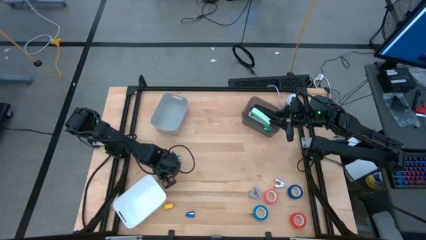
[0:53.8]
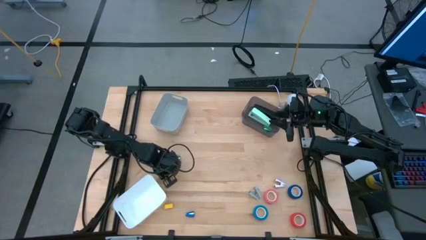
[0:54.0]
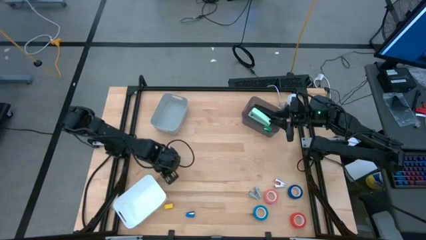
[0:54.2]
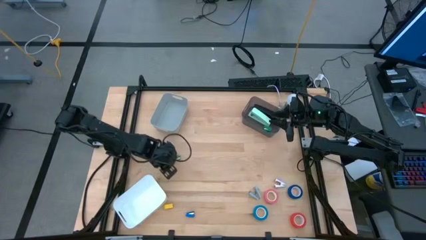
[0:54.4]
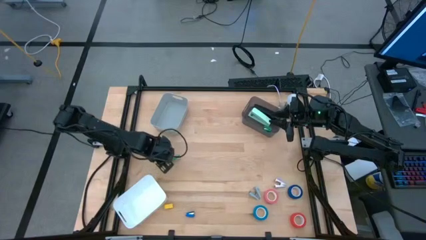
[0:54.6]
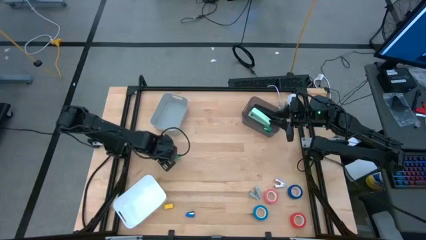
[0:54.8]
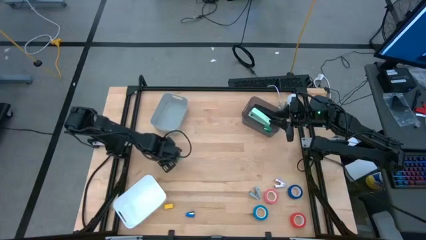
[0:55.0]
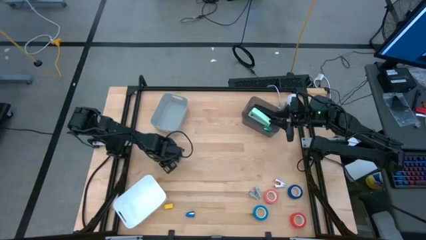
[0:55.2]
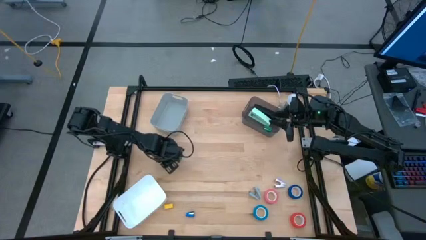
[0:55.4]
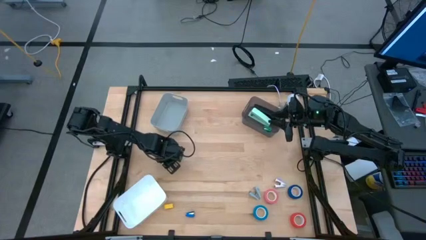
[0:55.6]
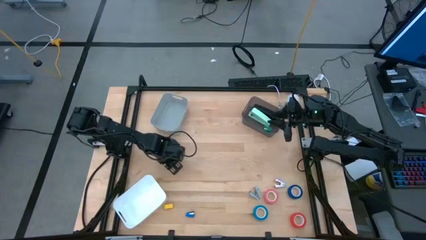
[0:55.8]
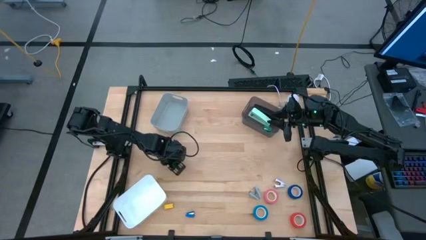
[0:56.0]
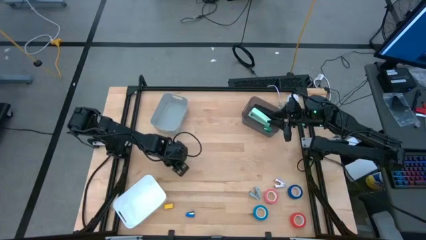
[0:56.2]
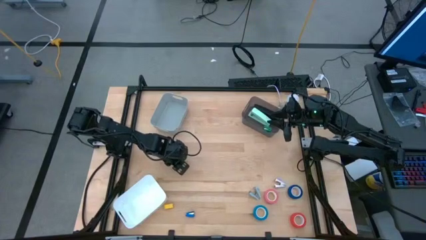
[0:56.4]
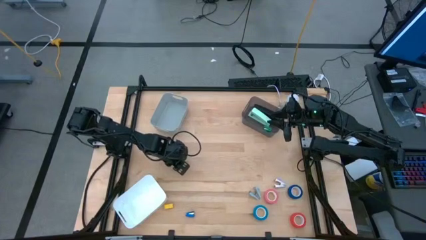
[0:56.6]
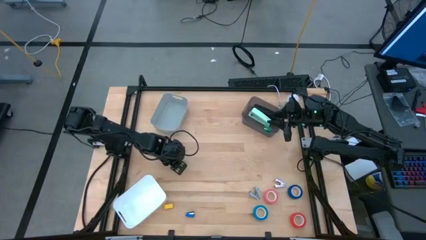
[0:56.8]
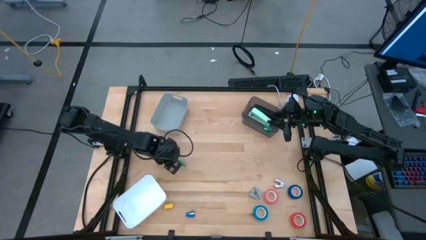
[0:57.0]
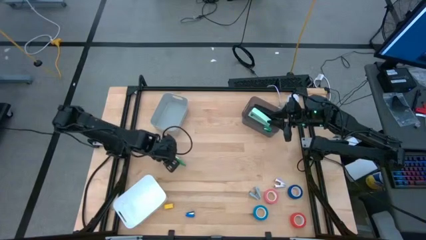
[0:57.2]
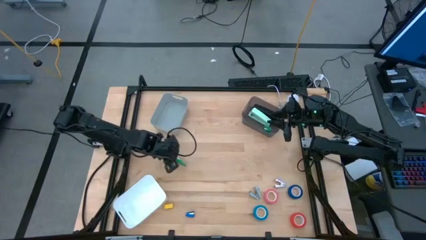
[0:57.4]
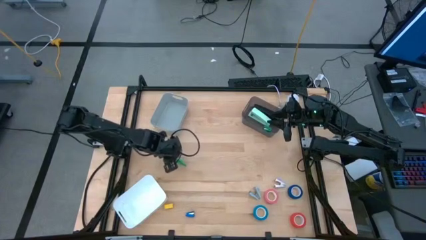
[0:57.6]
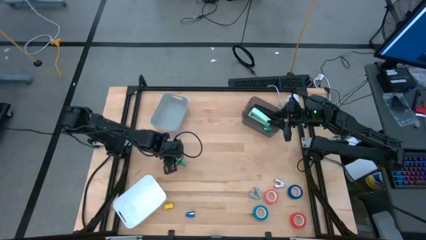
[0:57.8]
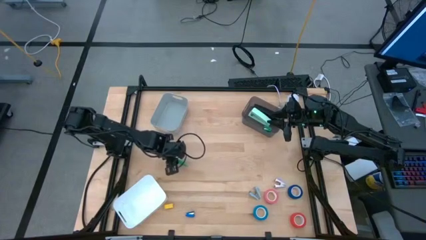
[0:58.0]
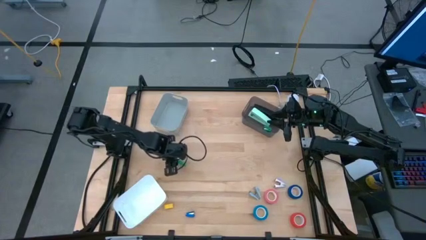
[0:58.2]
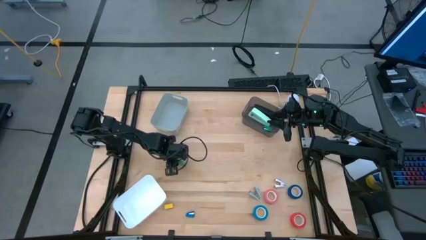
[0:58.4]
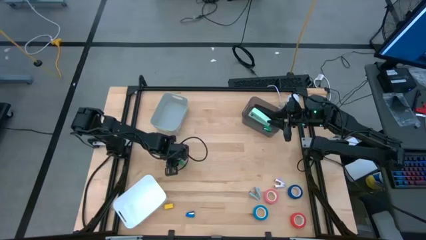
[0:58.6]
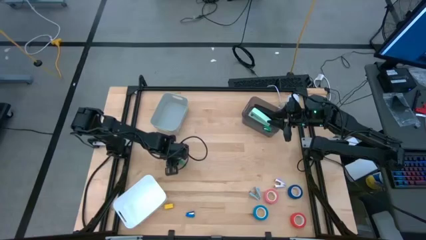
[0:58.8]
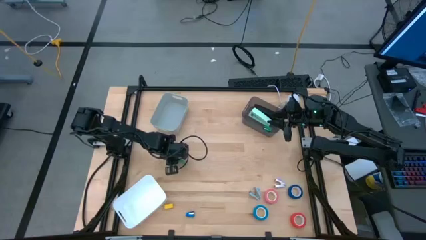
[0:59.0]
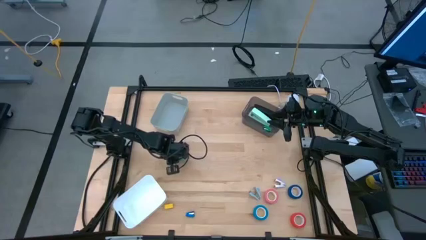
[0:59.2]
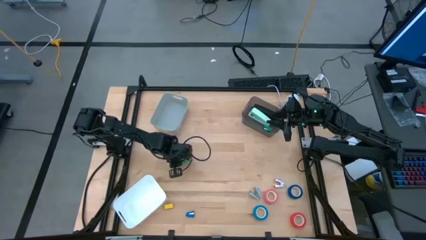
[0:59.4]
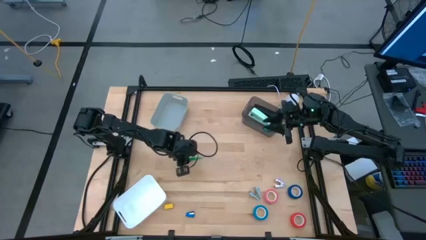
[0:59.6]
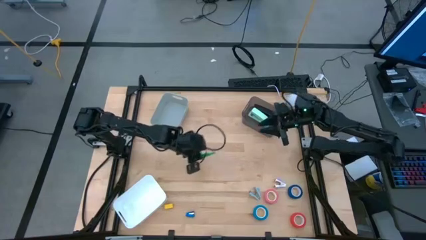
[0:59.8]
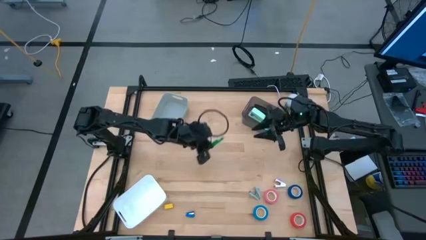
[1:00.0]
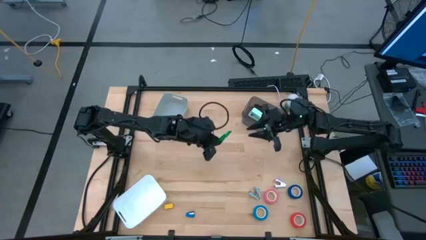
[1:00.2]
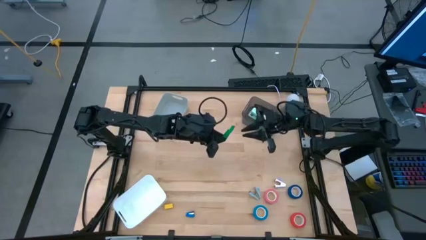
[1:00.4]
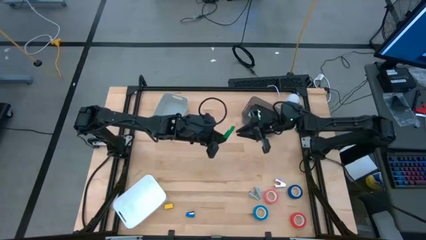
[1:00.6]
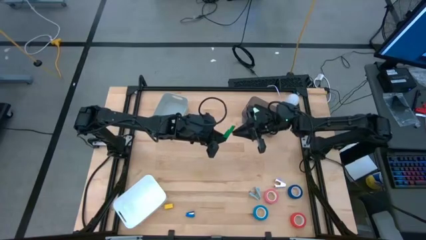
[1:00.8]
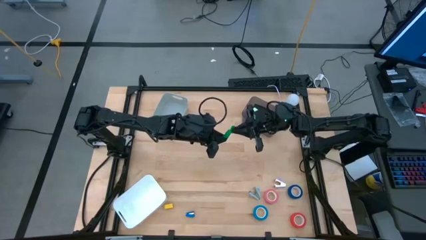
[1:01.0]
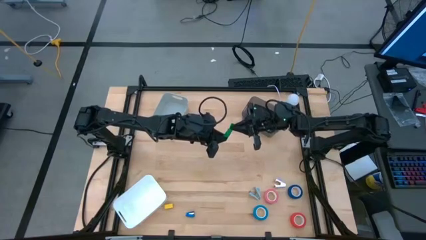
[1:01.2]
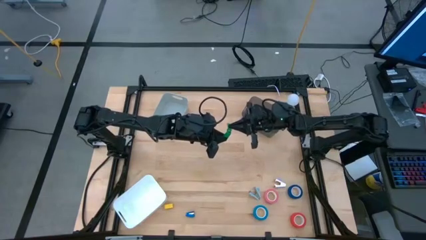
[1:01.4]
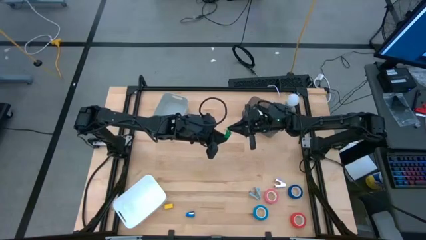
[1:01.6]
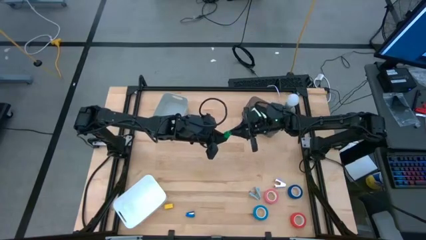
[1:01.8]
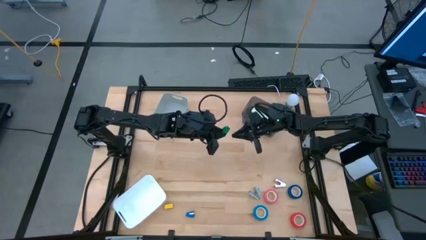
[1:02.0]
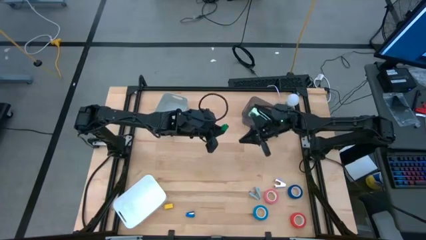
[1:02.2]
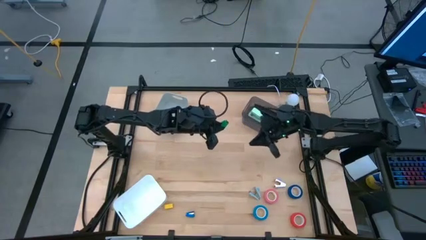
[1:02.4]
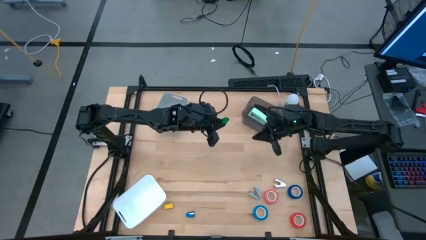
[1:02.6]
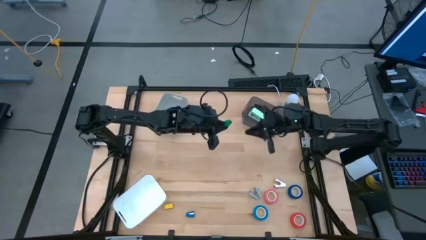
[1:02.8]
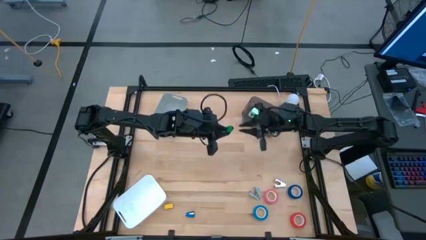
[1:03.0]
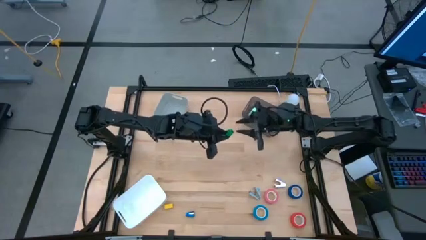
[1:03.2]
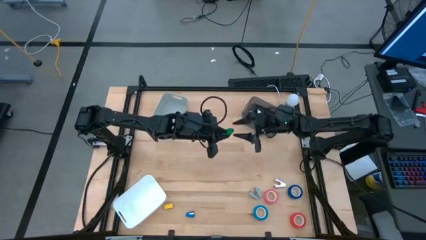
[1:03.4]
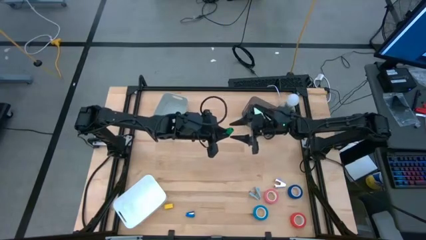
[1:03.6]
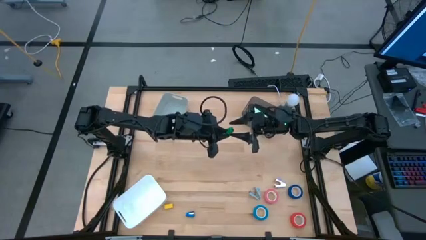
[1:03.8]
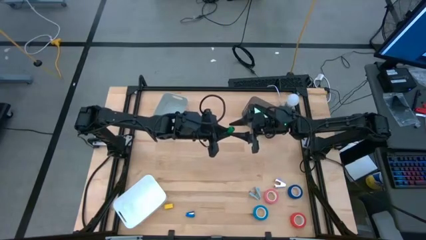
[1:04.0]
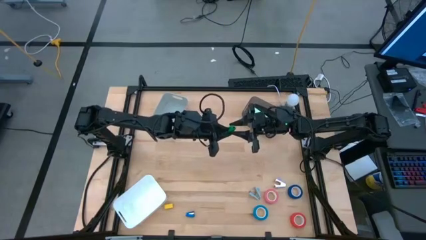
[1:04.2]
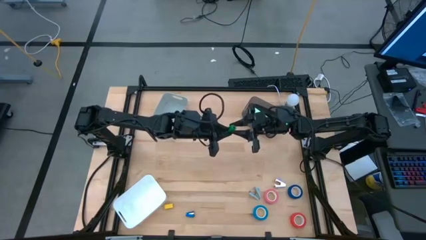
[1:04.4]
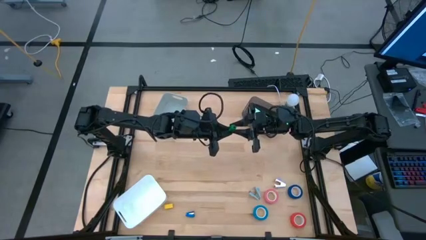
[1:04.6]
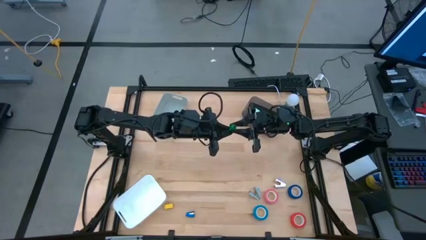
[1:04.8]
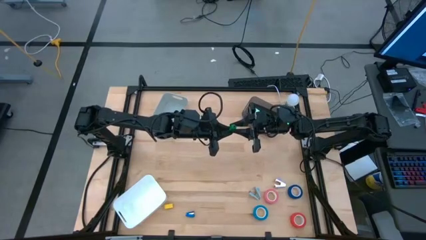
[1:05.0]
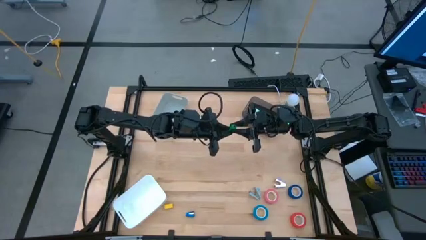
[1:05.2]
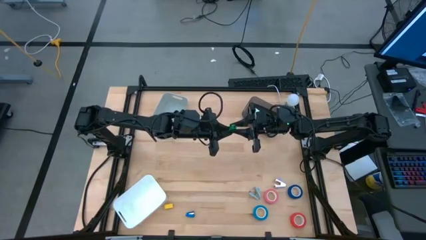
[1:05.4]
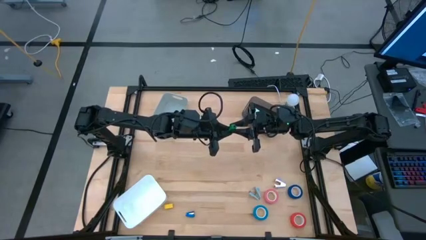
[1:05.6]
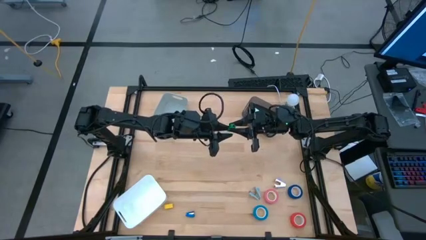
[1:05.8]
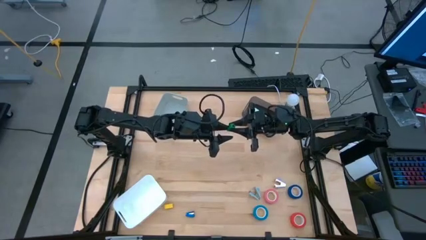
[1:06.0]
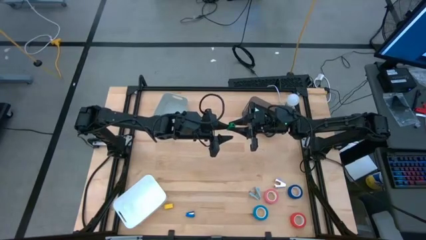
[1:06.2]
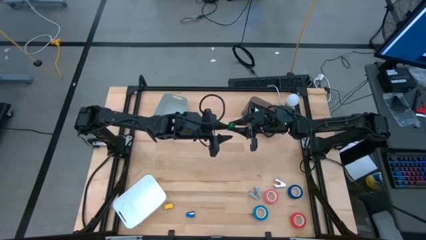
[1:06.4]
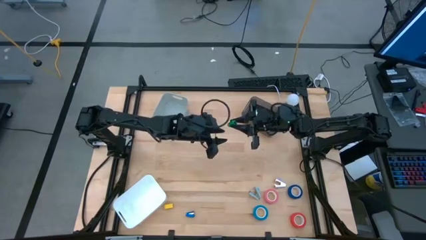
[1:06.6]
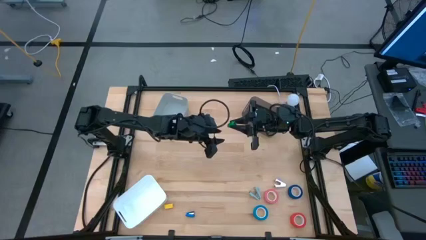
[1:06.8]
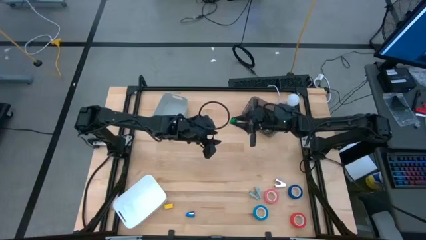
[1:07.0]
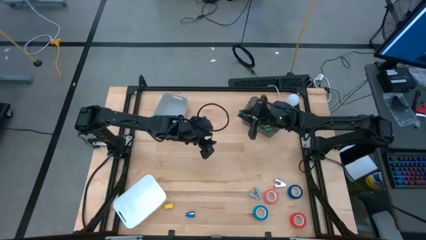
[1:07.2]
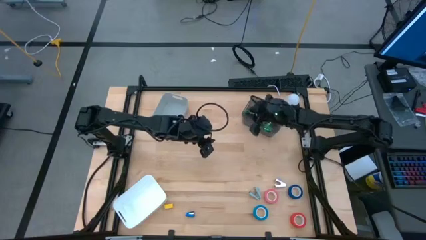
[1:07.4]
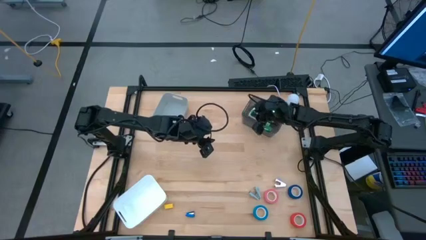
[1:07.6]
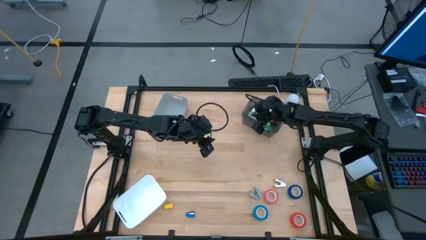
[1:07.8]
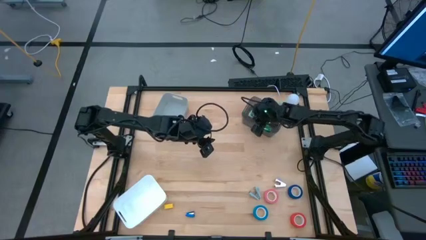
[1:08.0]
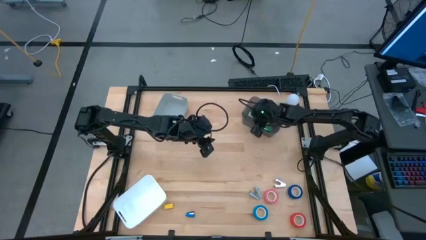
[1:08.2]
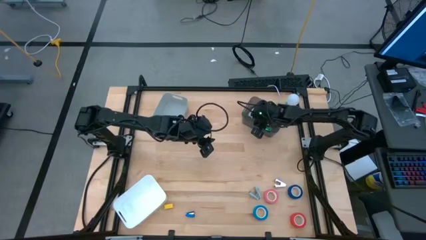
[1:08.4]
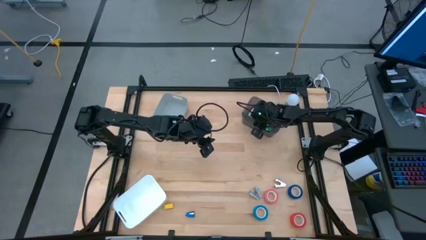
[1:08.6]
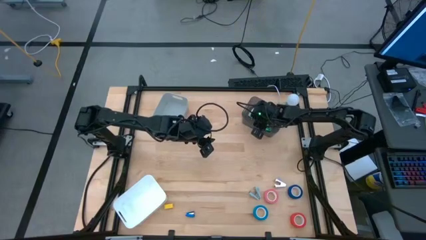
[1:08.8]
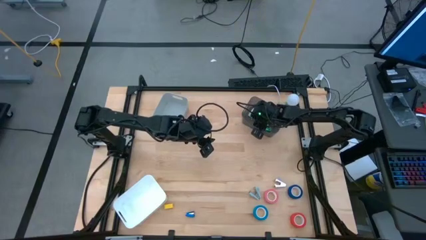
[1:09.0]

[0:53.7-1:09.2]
Task: Pick and place Stapler, Stapler remover, tape
Put the dark green stapler into the black bin
